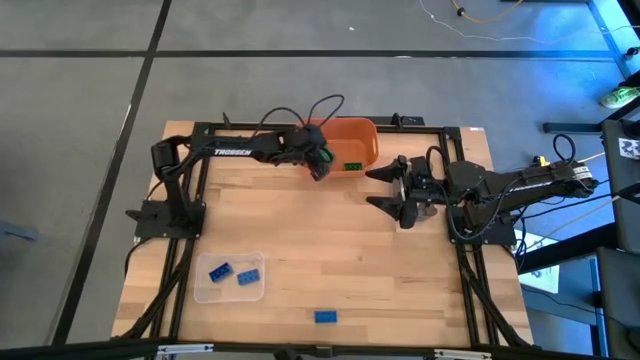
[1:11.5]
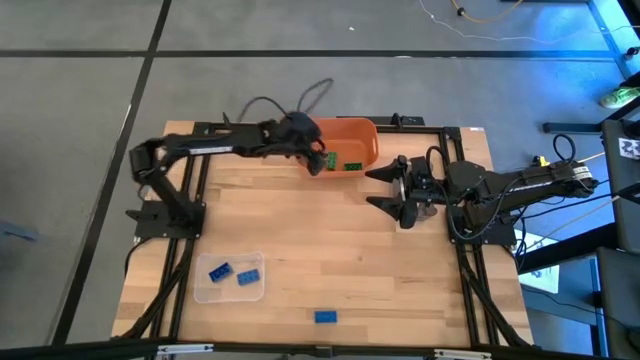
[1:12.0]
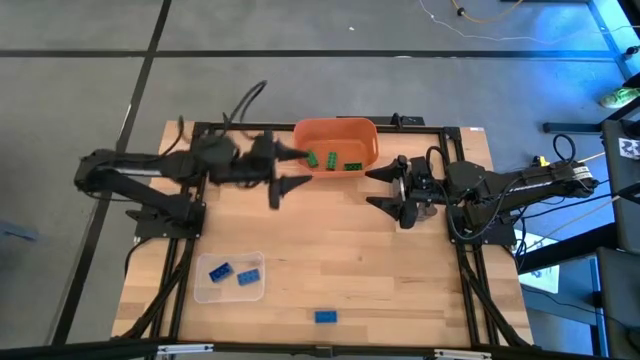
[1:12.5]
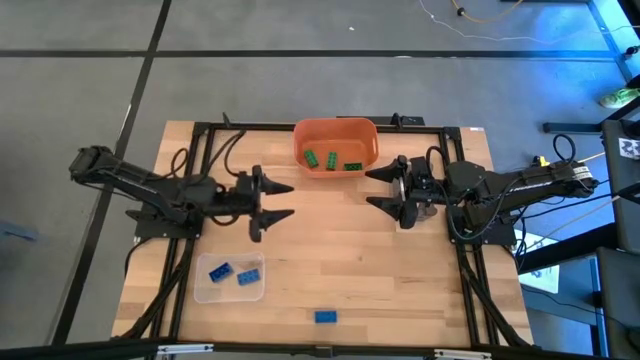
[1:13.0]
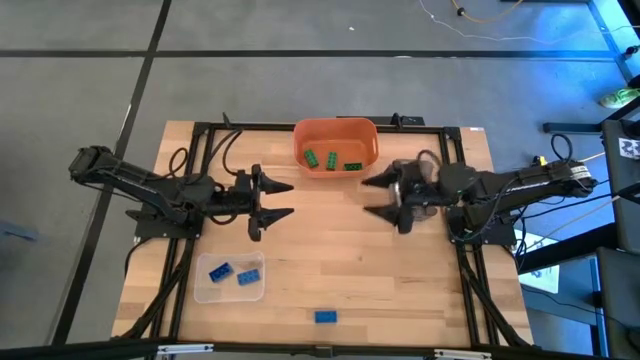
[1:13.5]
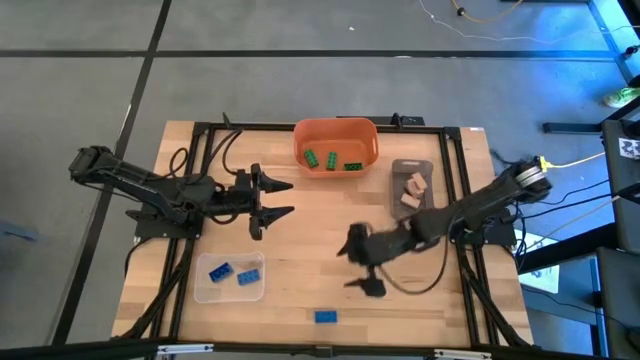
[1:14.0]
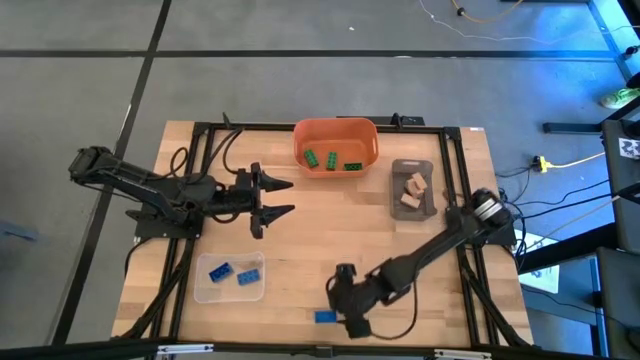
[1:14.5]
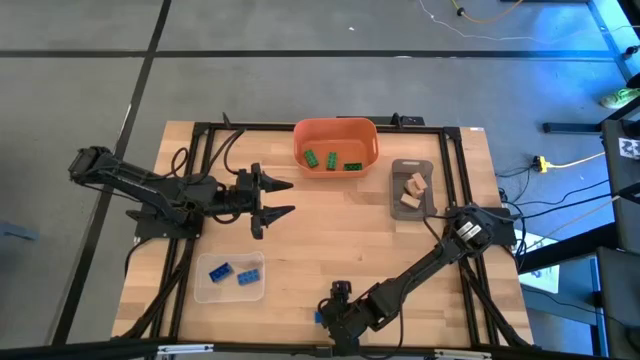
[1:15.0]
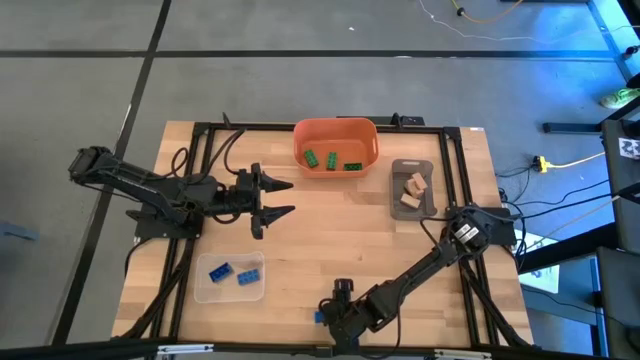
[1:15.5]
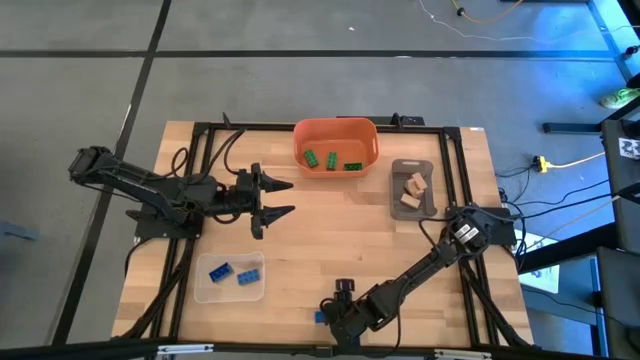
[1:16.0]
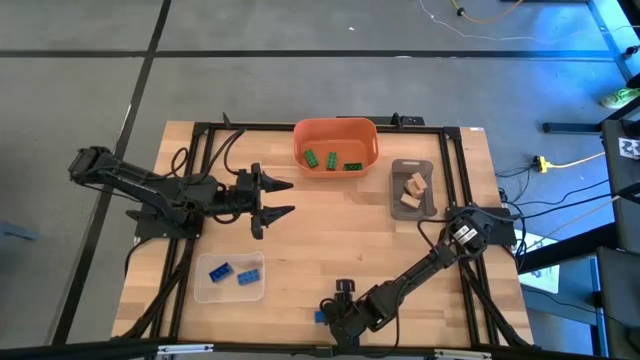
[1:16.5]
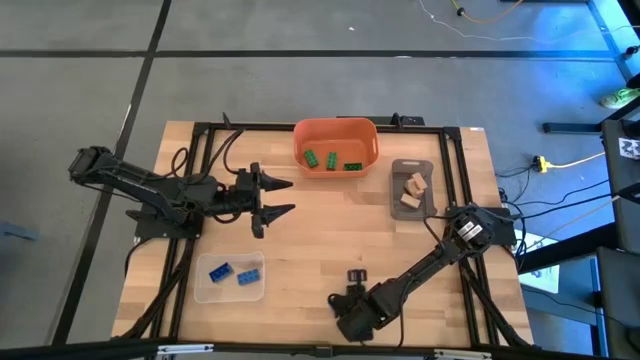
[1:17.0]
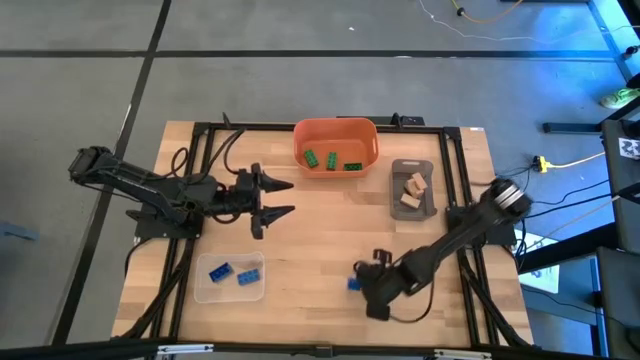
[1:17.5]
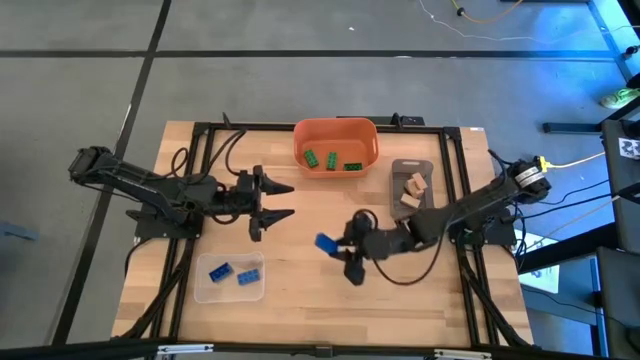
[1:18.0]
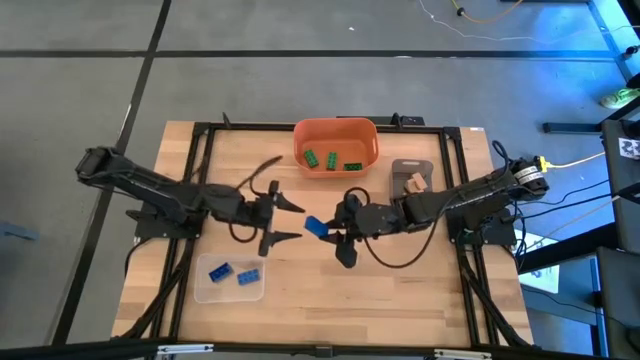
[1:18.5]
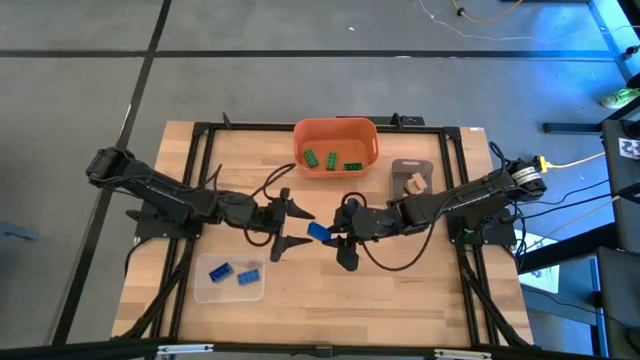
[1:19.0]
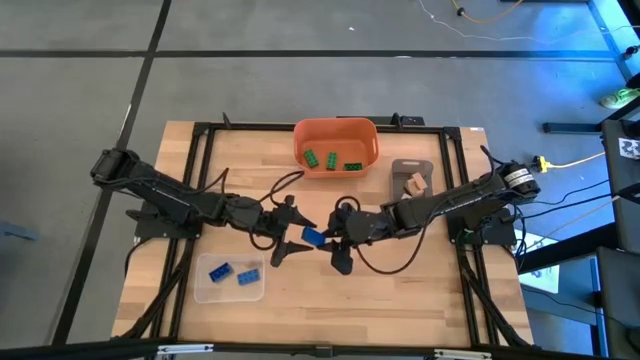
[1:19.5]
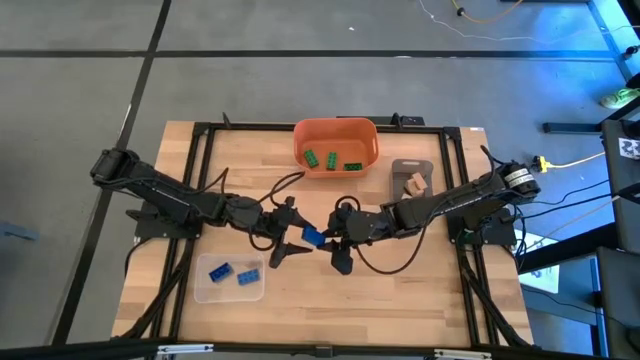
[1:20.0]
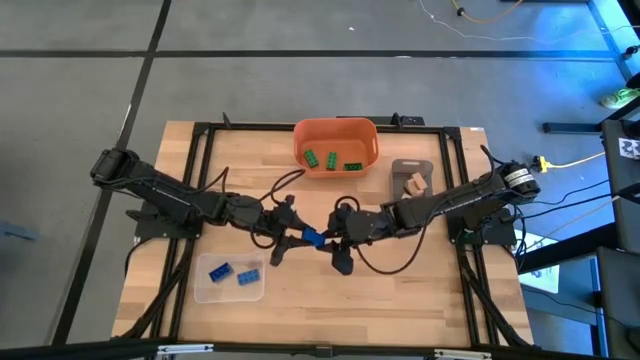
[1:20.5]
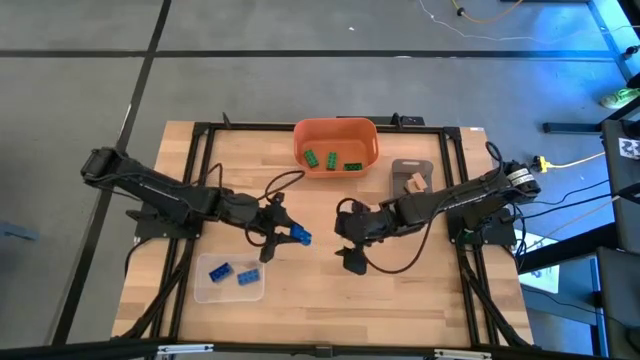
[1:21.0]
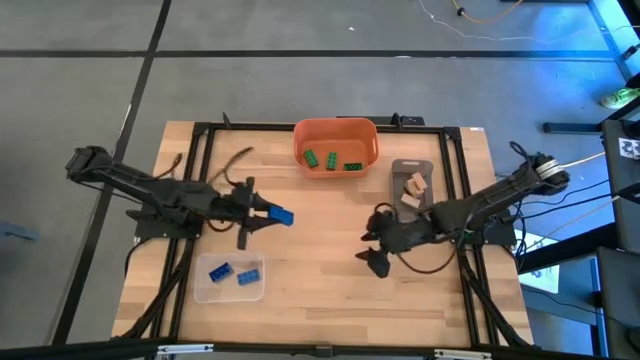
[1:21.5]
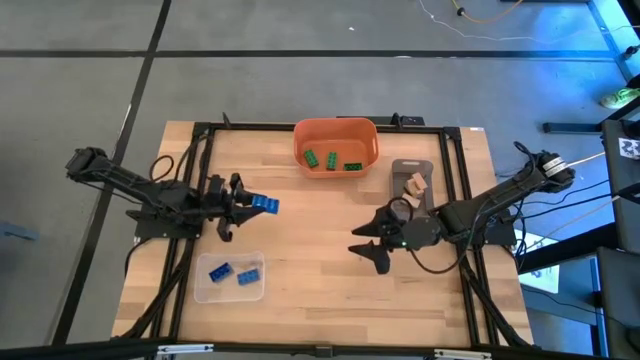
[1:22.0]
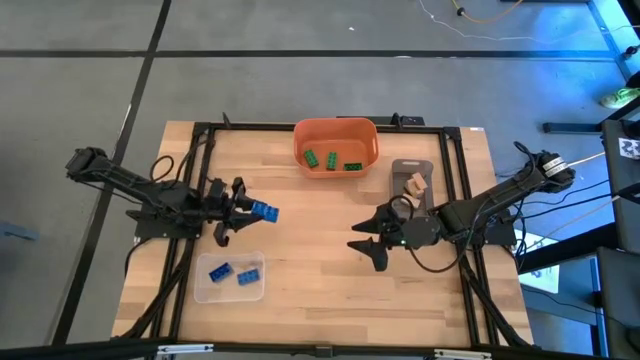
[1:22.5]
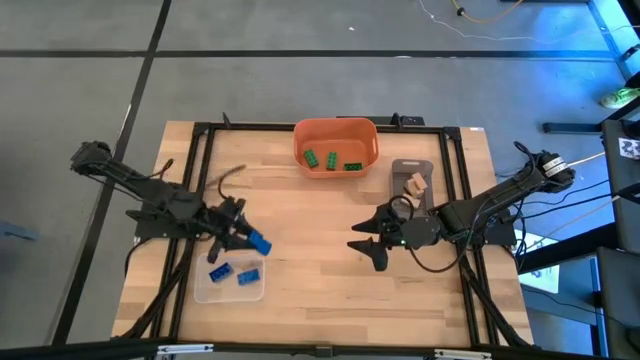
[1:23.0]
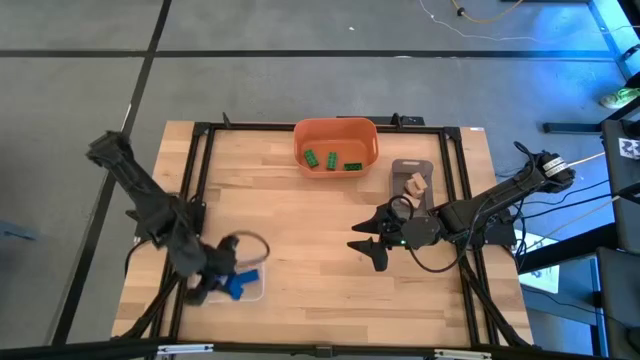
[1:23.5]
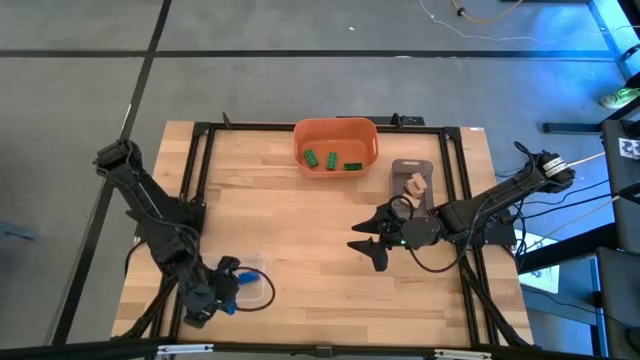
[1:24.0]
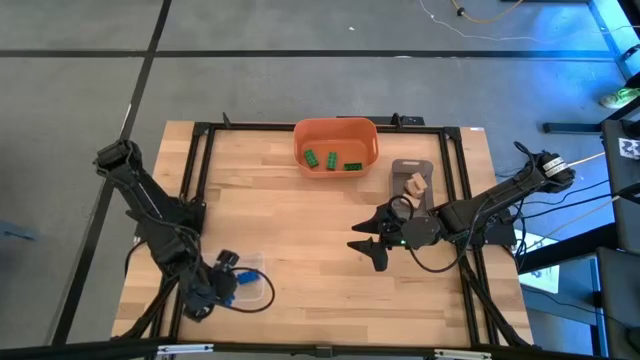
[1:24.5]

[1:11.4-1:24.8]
Task: Sort & place blocks by color
Put the blue 8 stud game piece into the transparent bin

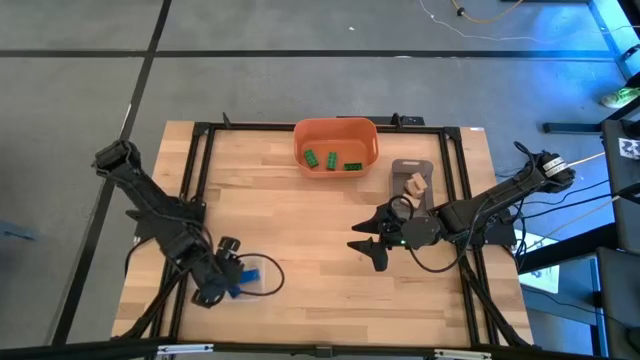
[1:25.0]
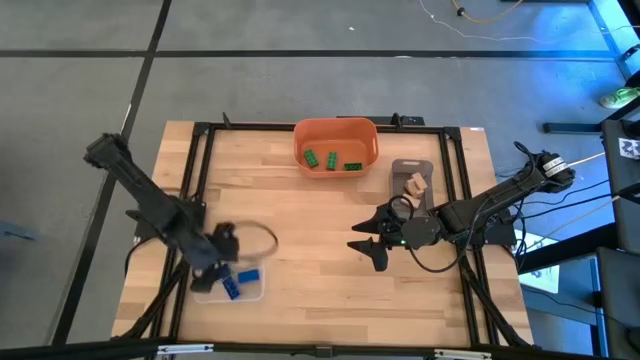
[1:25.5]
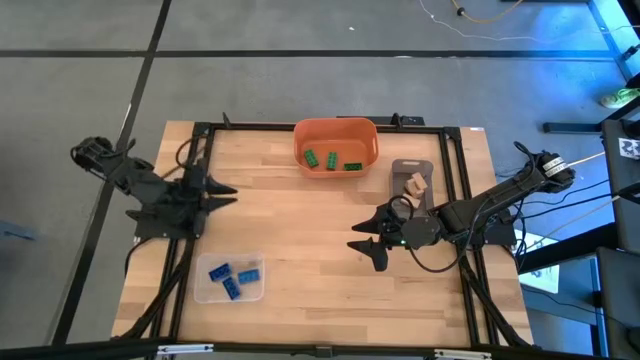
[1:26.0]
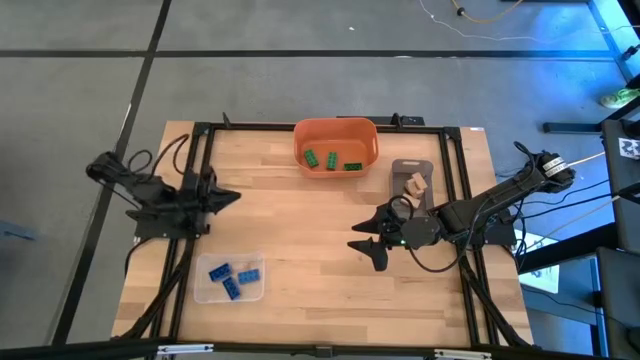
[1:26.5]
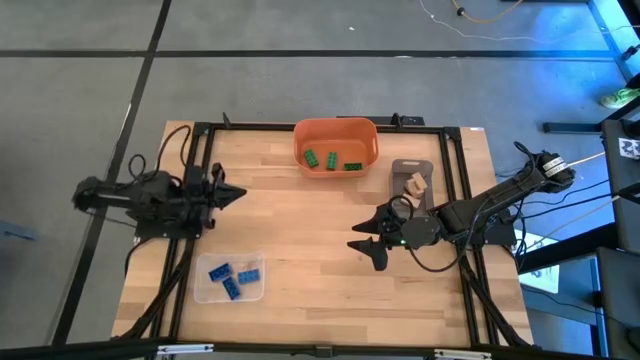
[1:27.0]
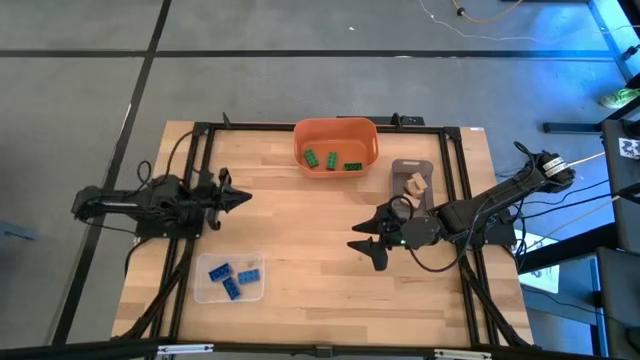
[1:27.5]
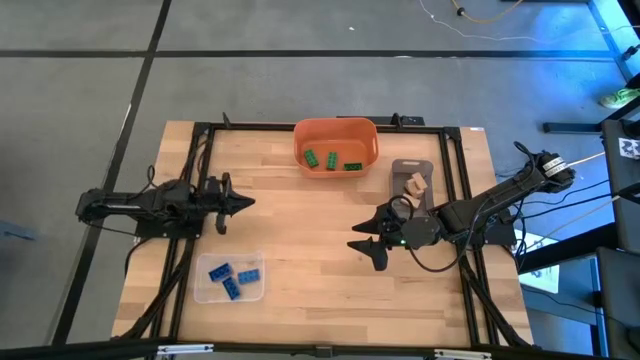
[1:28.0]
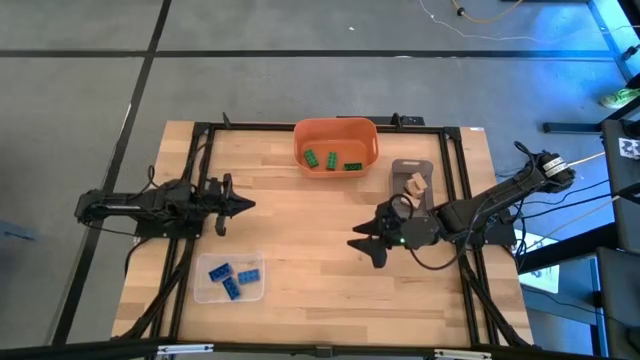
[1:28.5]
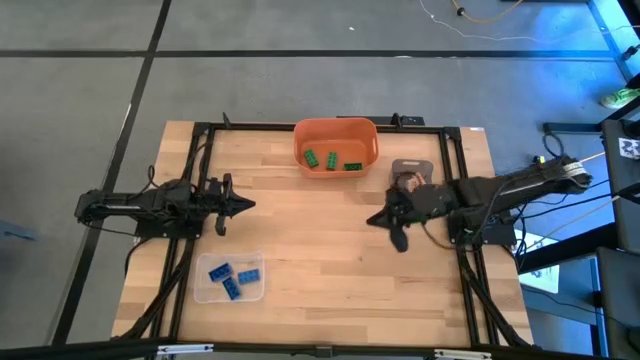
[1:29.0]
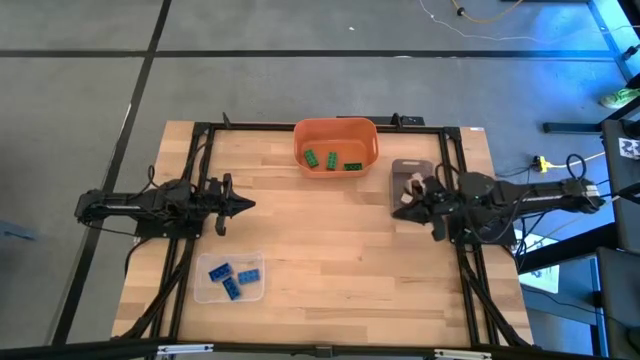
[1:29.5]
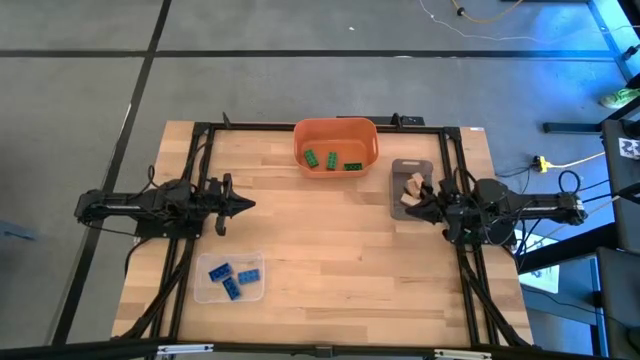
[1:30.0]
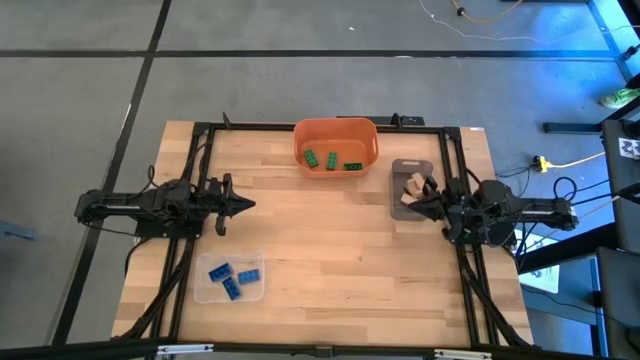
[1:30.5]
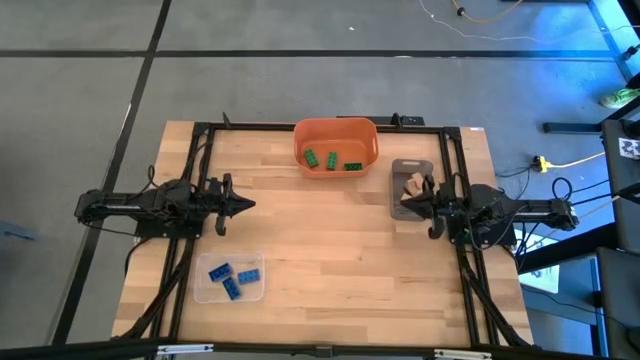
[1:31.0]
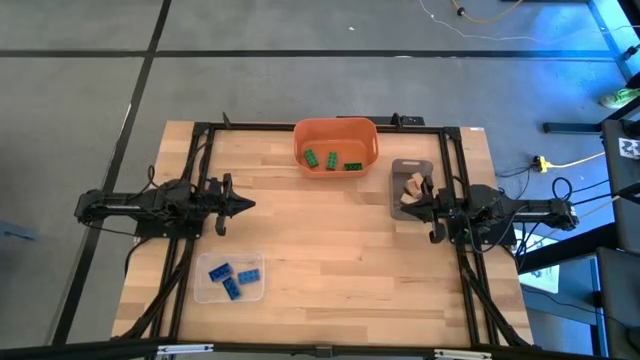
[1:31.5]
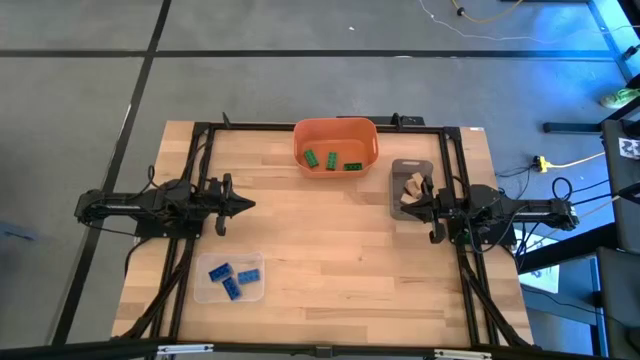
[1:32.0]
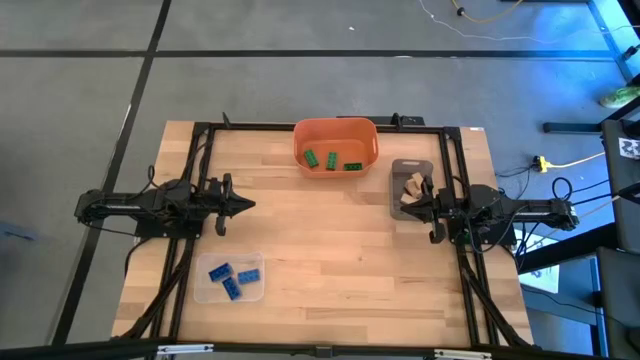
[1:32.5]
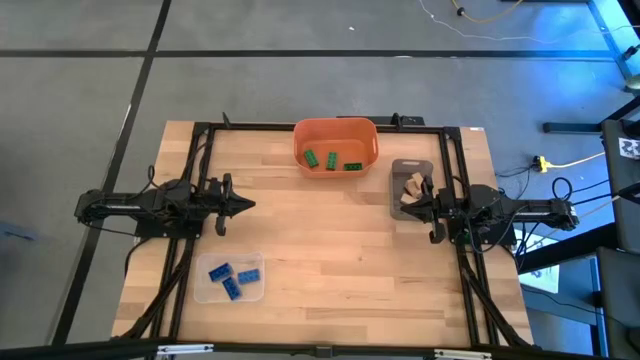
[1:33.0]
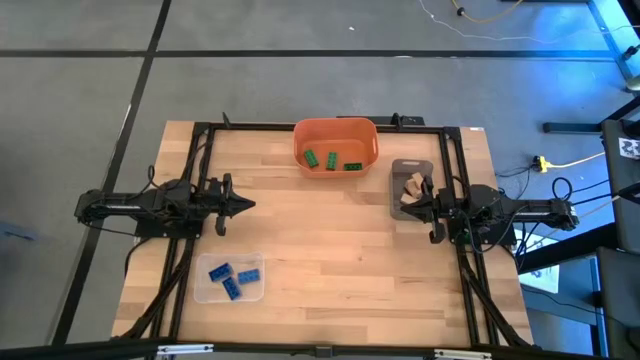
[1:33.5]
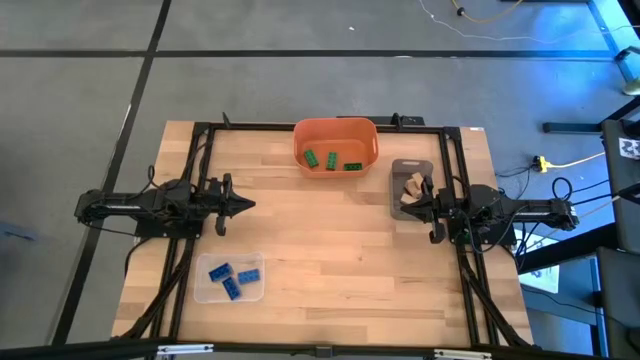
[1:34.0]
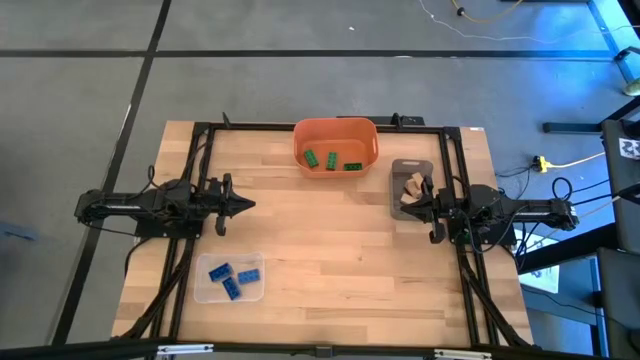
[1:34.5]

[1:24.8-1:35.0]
Return to Home Position
